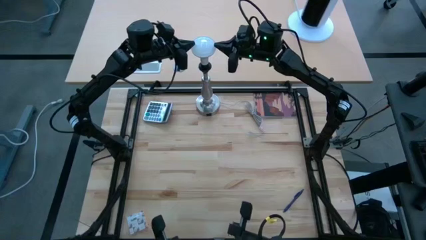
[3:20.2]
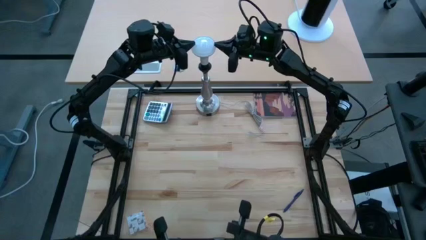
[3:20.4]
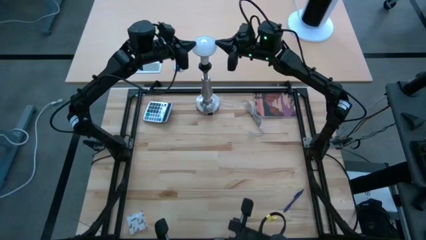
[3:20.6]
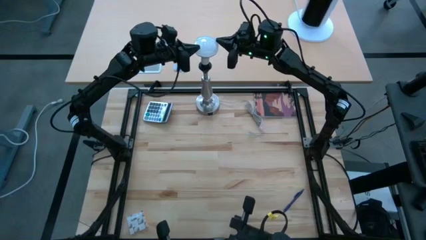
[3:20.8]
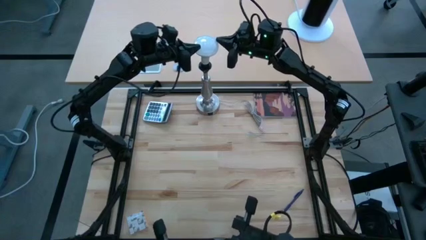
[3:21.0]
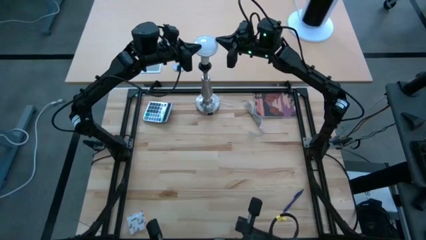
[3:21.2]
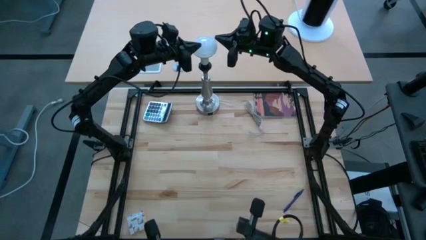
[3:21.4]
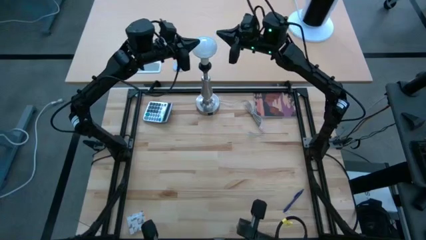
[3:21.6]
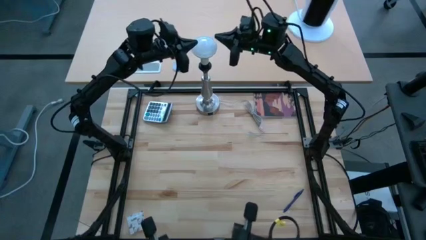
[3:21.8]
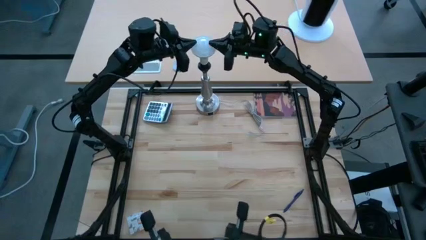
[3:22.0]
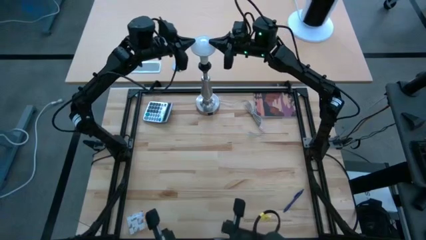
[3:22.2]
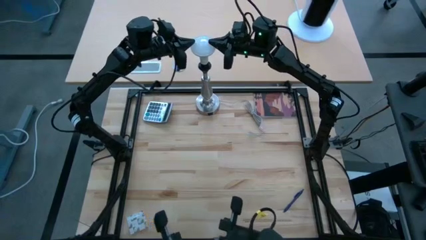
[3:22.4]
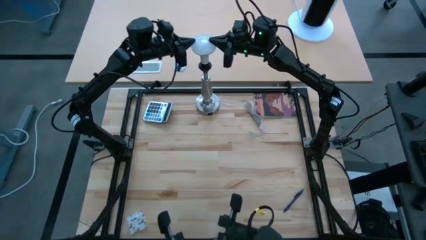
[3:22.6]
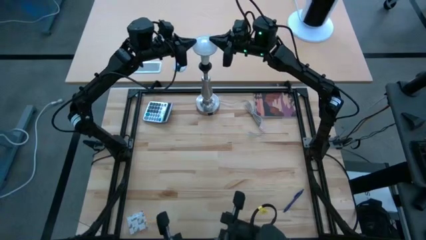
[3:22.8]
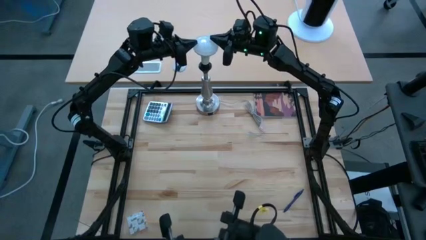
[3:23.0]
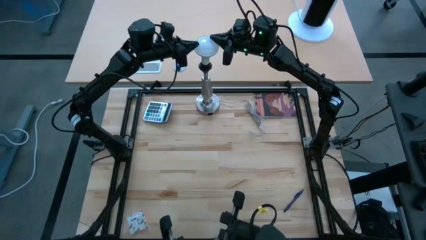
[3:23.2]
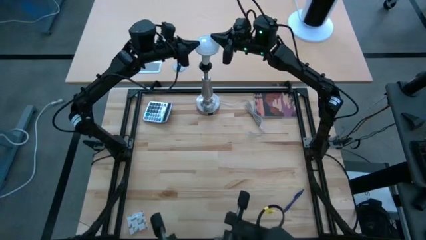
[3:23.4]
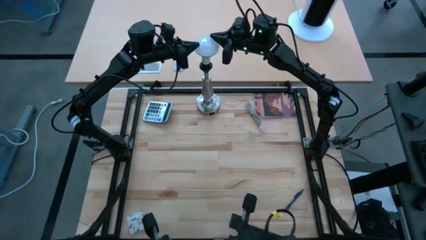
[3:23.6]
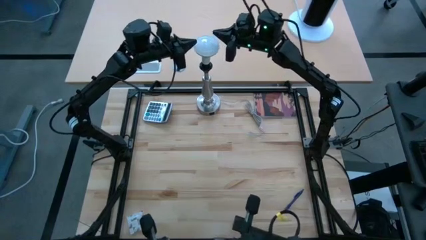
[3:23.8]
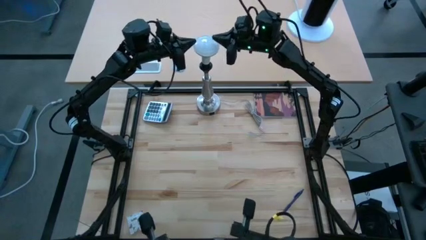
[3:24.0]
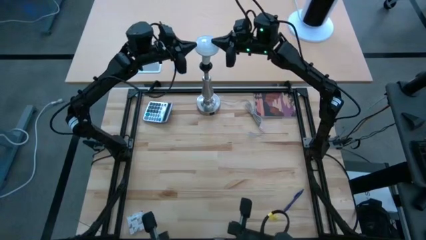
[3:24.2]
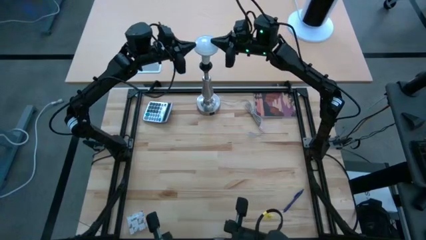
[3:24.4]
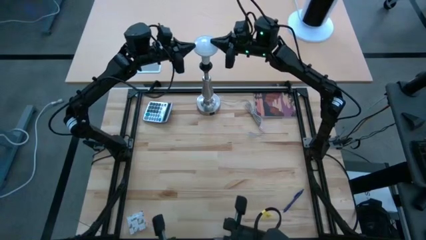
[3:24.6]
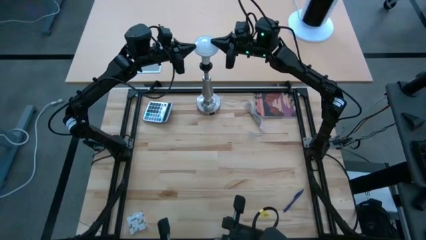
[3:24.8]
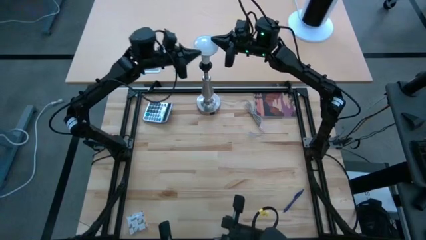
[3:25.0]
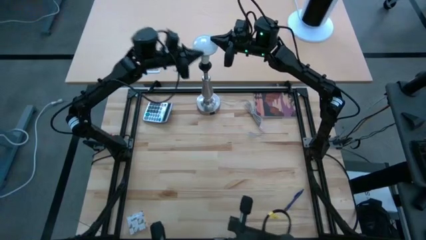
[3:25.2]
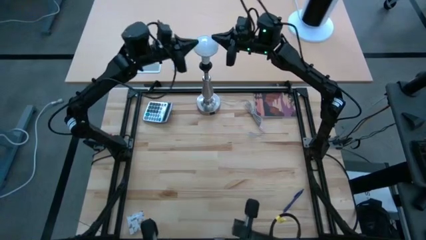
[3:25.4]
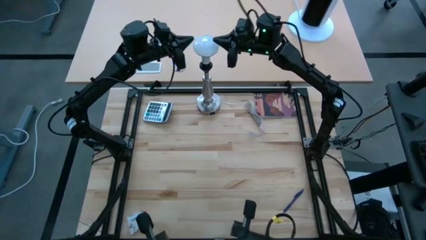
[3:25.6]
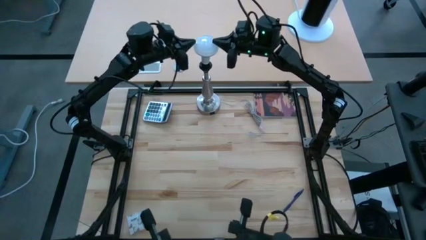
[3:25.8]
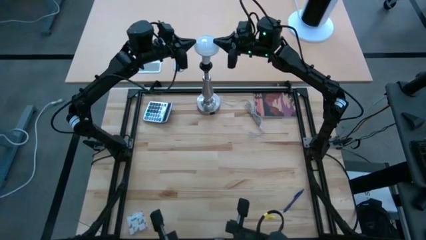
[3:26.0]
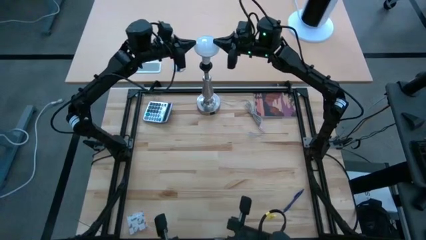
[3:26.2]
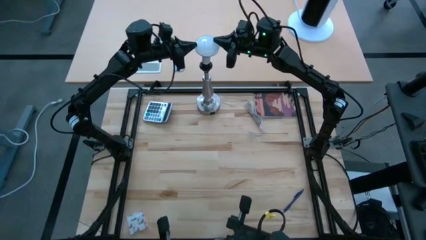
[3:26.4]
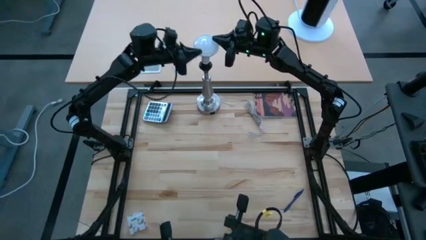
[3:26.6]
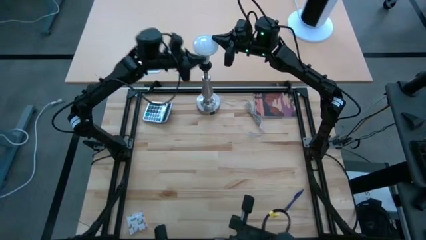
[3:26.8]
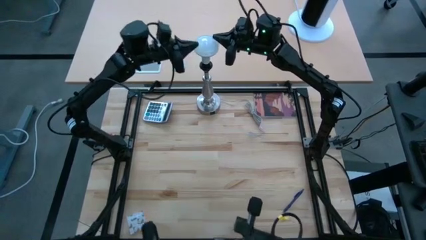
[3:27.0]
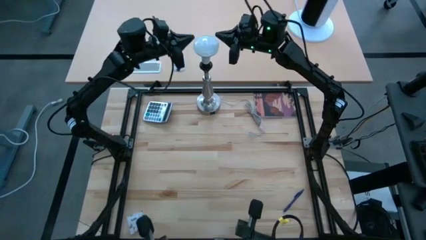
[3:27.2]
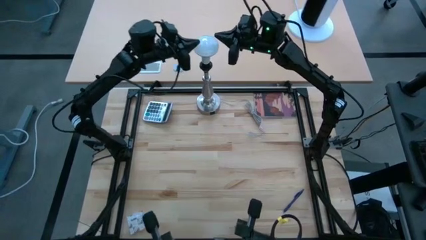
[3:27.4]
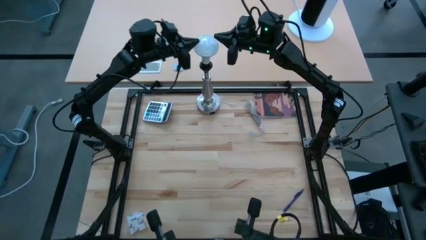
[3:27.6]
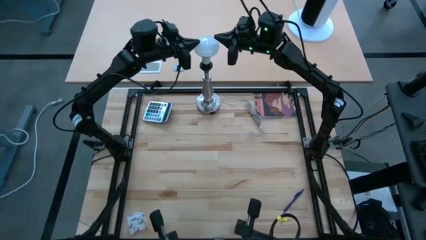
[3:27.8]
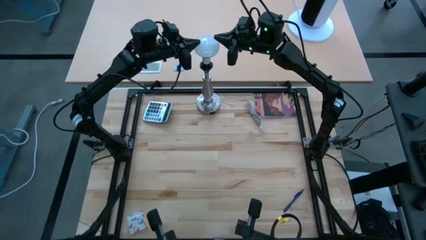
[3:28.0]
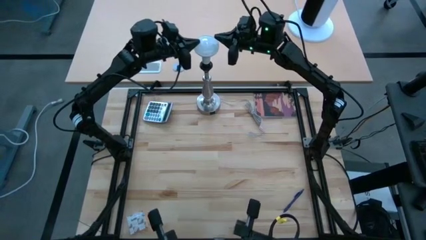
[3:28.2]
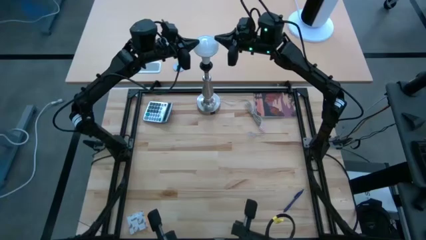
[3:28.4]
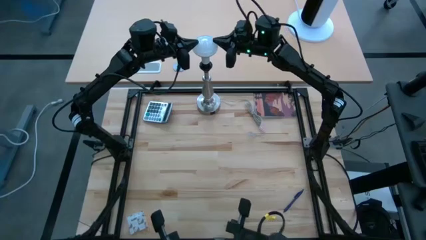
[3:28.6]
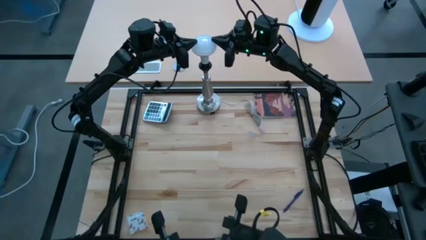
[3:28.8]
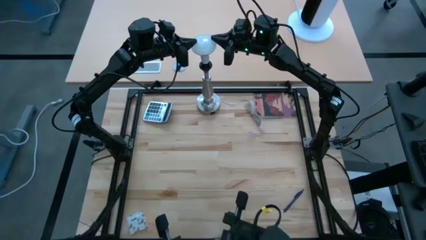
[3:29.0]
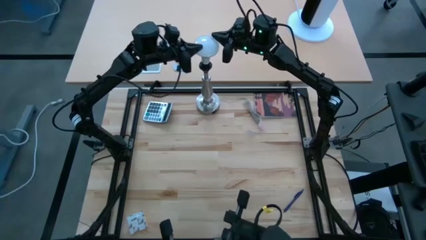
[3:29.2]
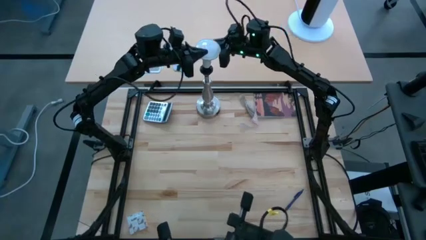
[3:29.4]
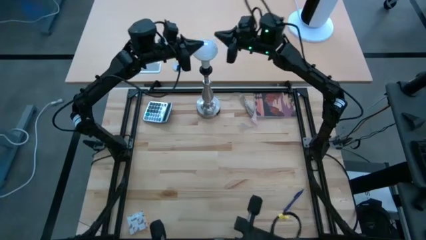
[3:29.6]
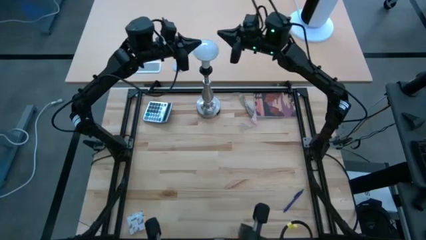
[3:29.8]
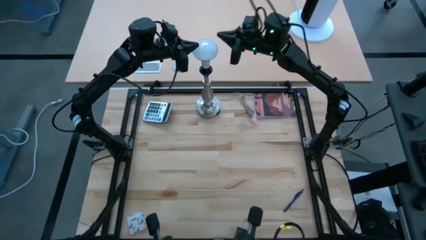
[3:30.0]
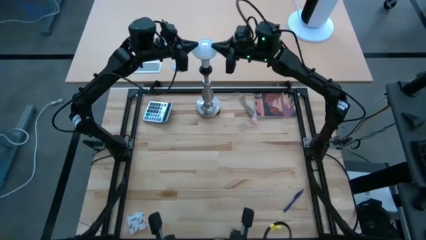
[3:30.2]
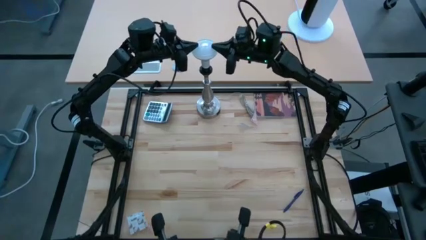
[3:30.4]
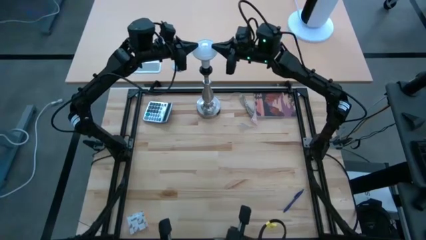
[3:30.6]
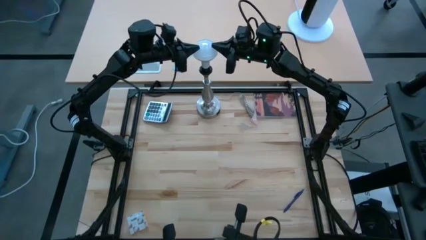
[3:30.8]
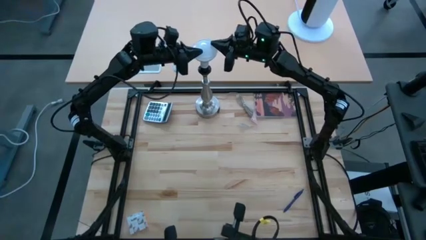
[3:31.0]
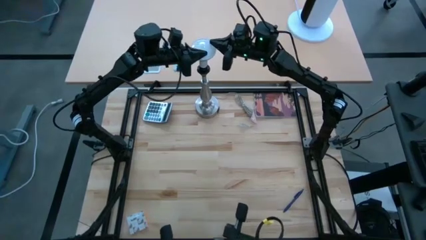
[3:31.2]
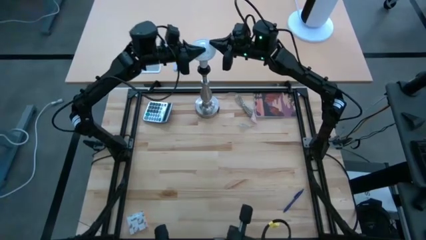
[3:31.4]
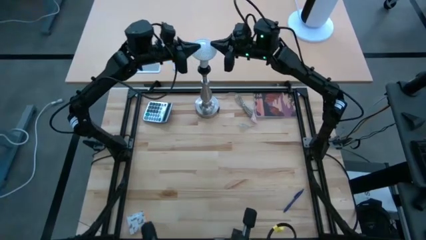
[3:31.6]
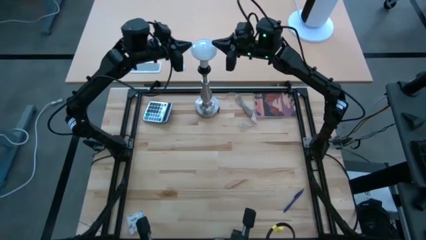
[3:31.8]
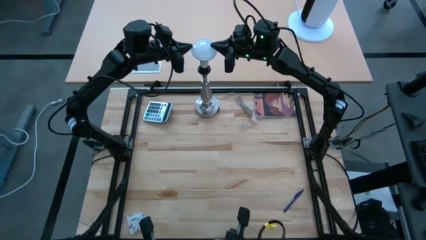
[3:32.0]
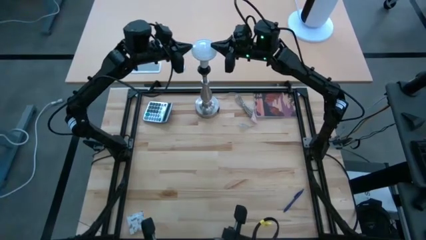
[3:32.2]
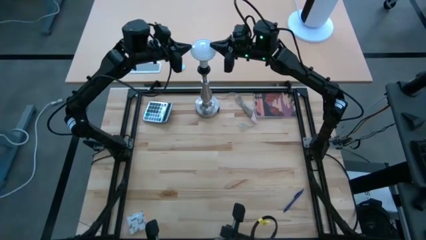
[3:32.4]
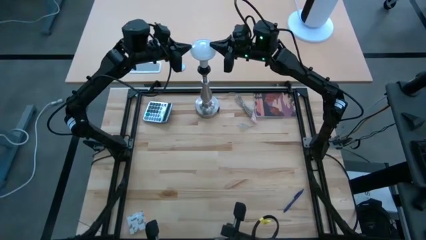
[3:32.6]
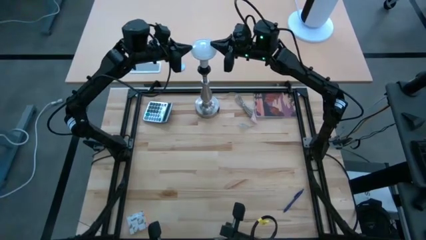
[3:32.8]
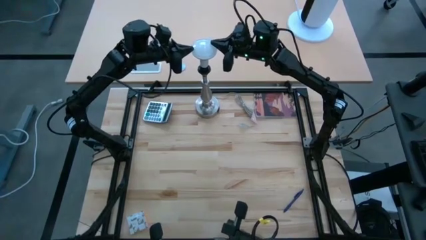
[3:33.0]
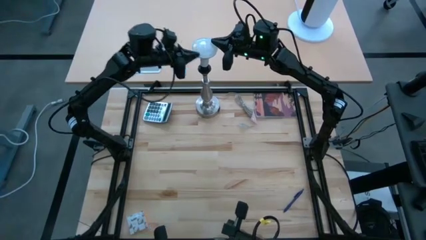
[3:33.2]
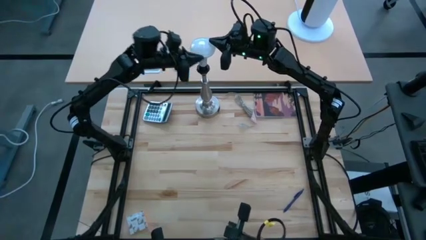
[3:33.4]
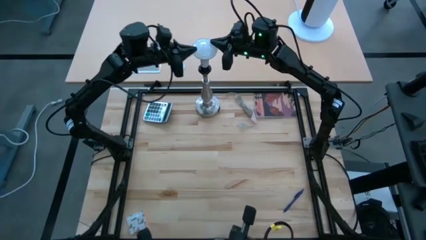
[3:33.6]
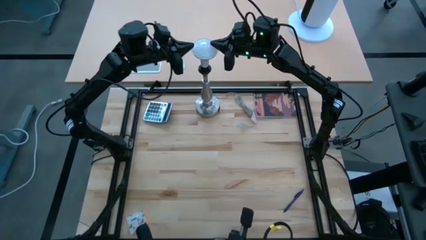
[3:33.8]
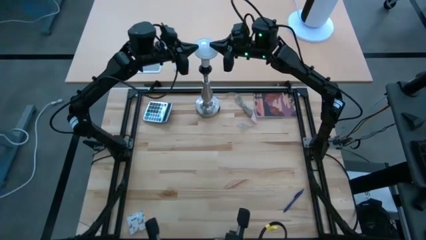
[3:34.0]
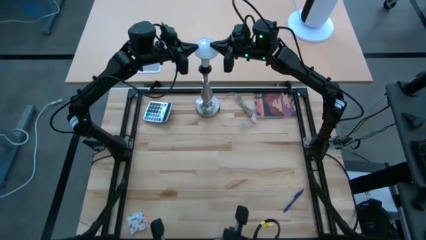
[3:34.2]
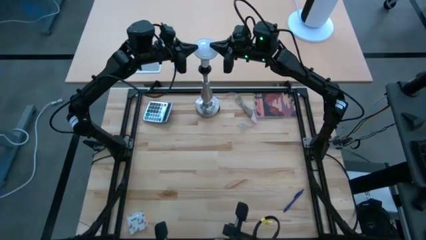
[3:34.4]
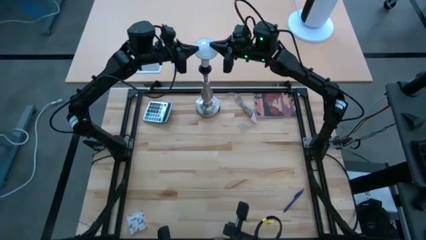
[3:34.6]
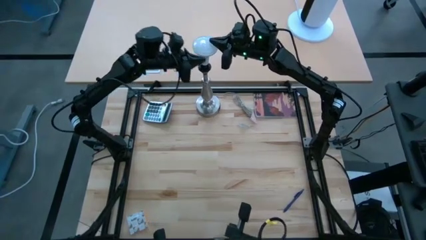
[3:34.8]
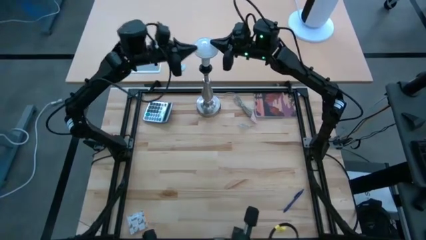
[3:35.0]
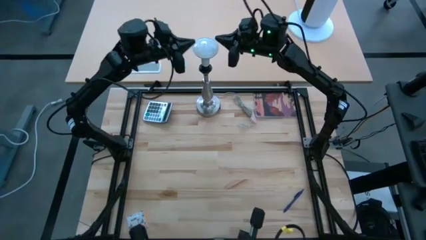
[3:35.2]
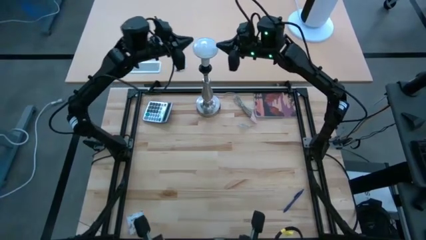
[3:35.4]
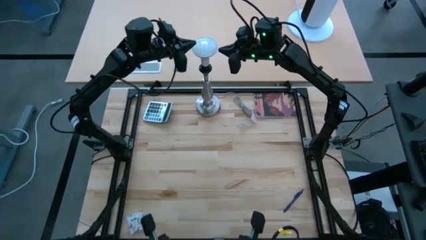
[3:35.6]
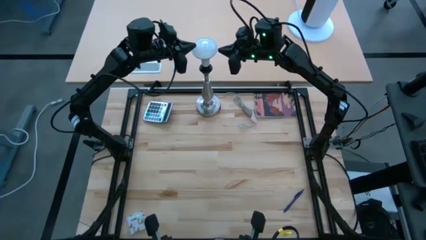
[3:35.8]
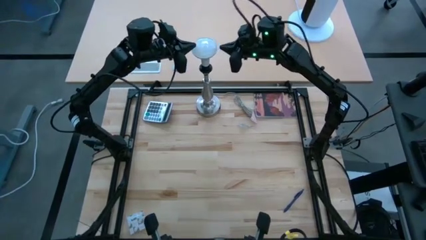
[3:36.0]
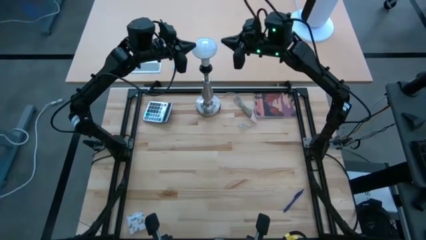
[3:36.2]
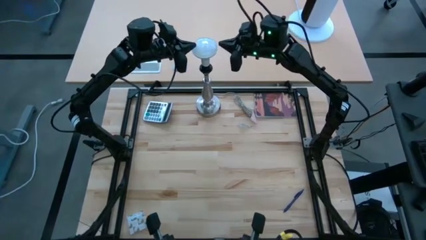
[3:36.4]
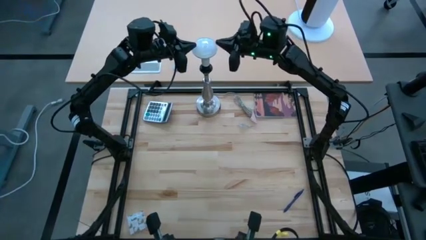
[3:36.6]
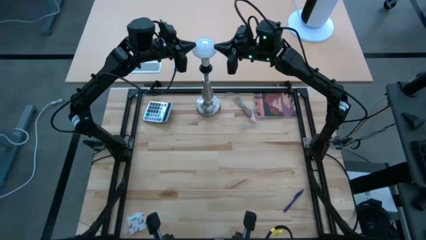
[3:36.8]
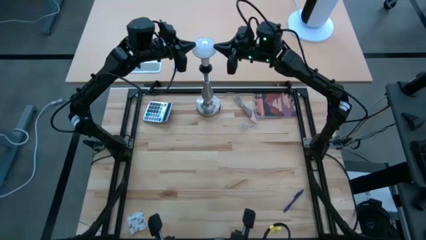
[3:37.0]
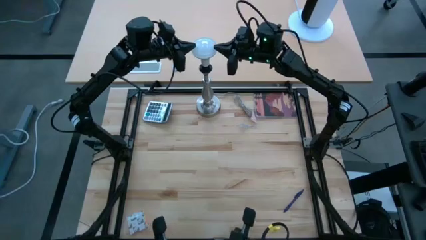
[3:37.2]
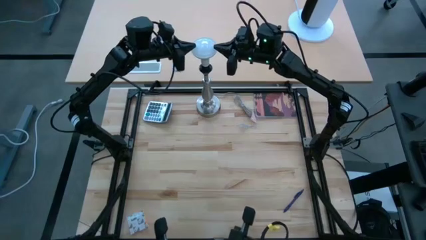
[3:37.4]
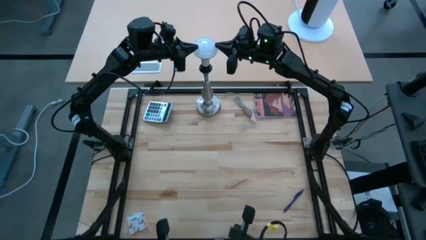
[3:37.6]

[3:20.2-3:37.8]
Task: Screw lightbulb
Remove the lightbulb from the table lamp
